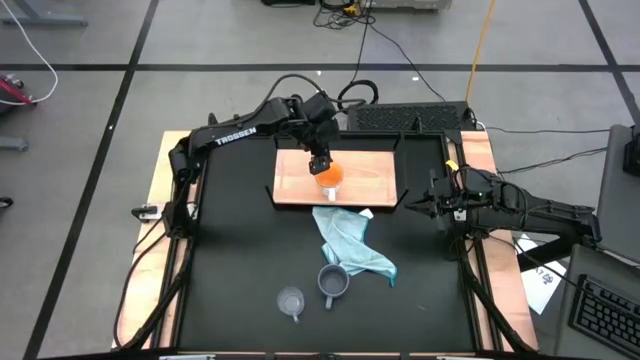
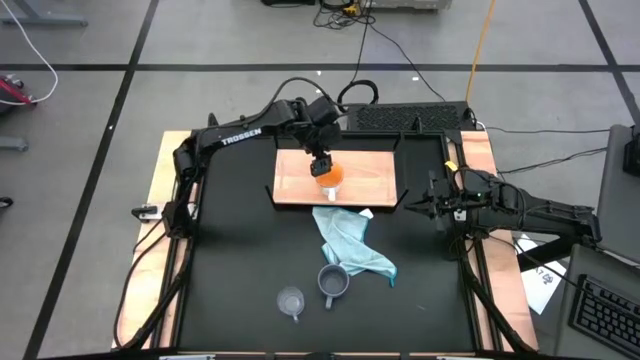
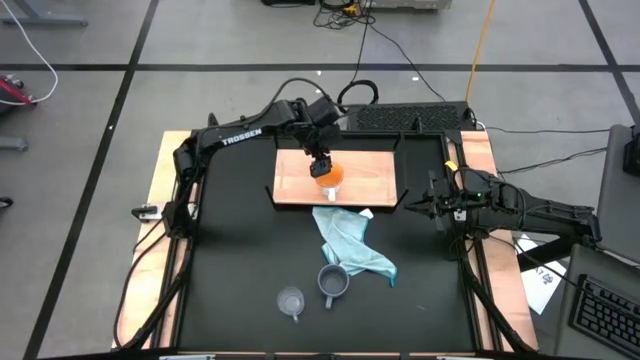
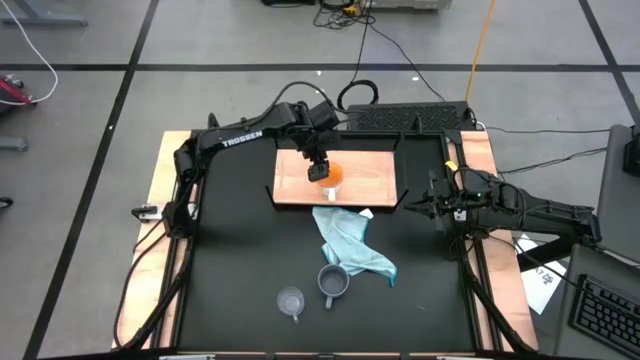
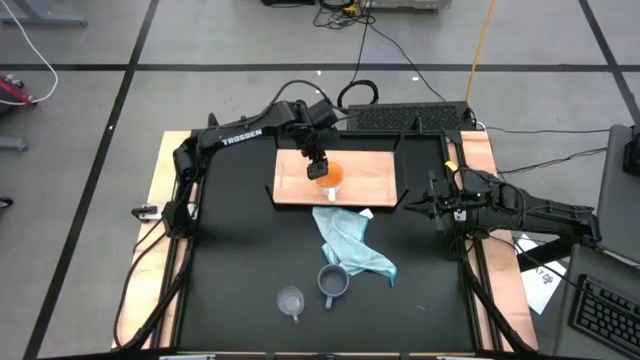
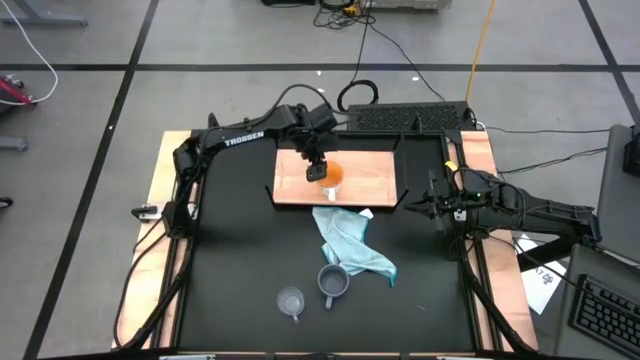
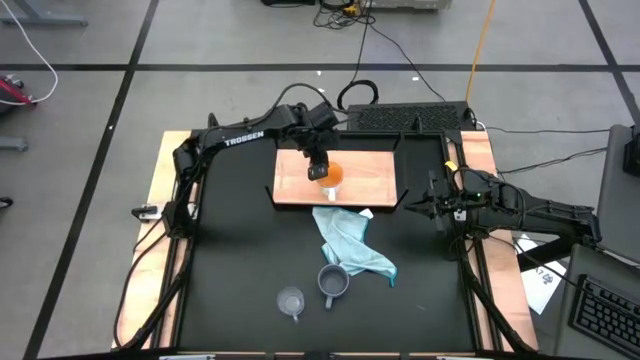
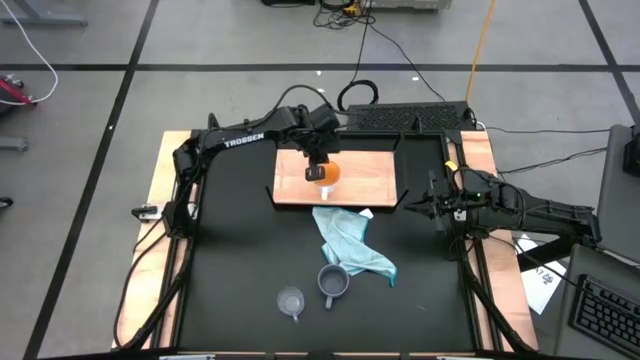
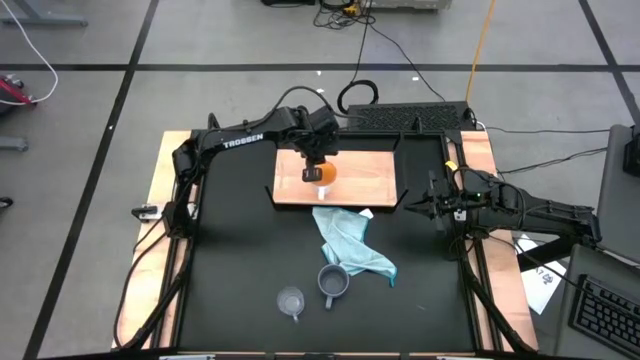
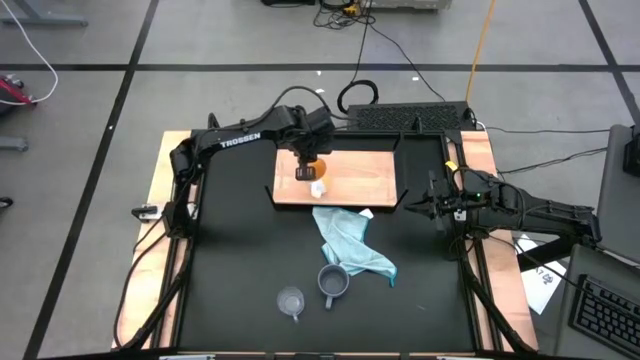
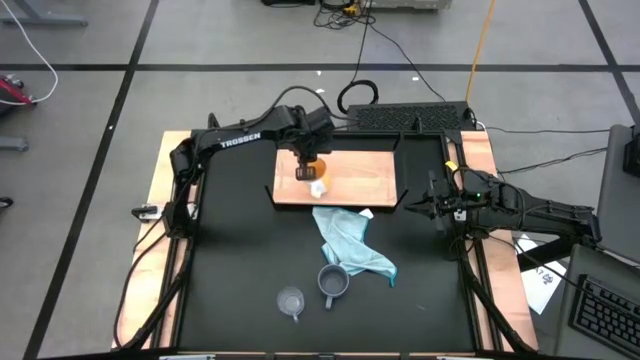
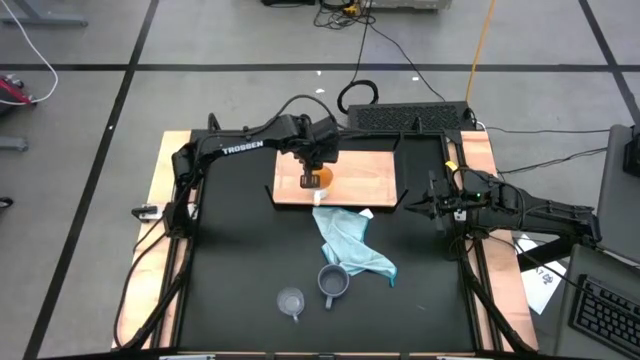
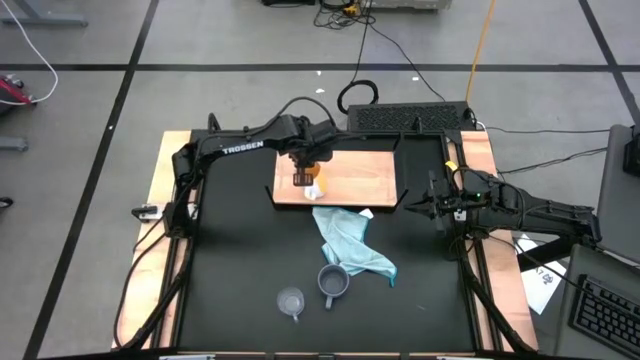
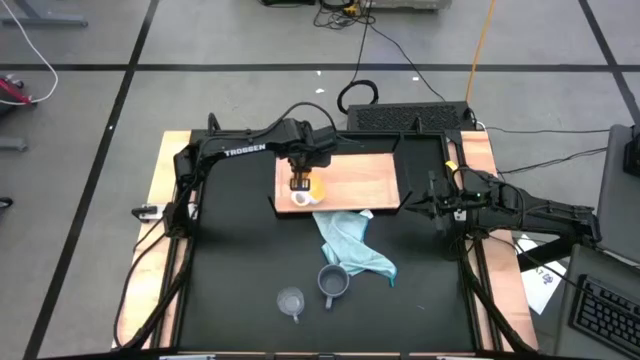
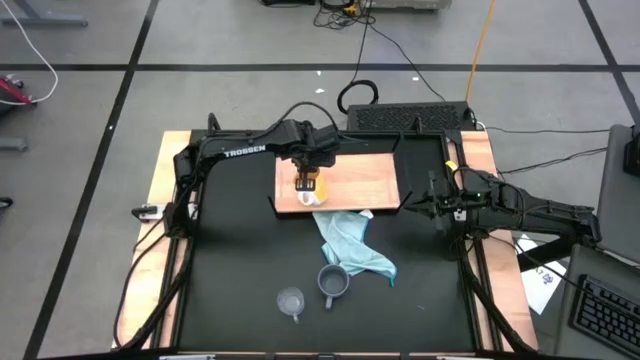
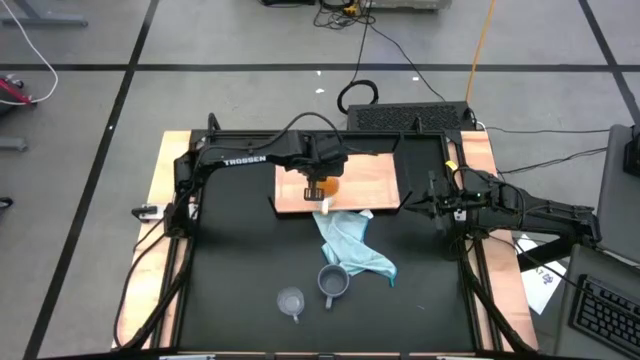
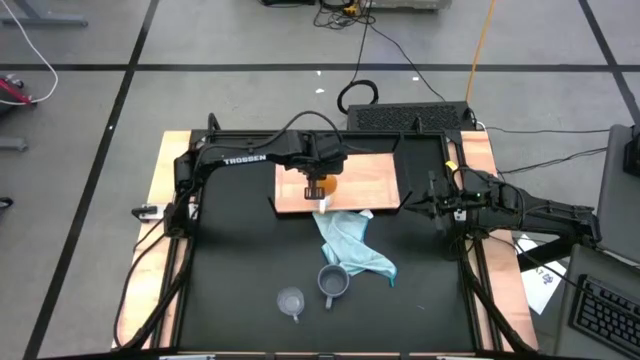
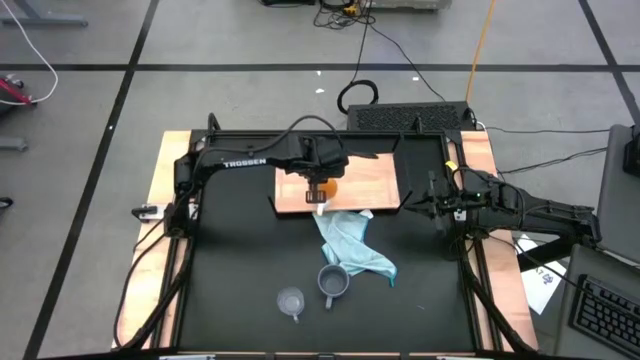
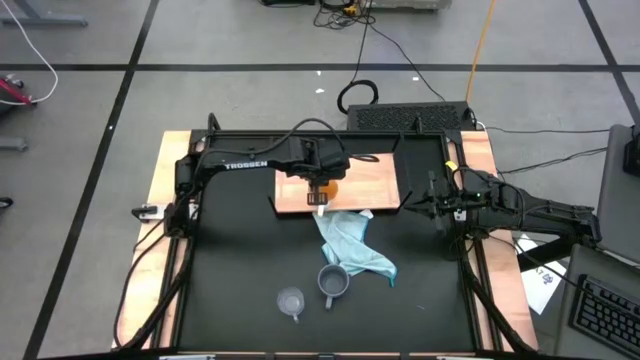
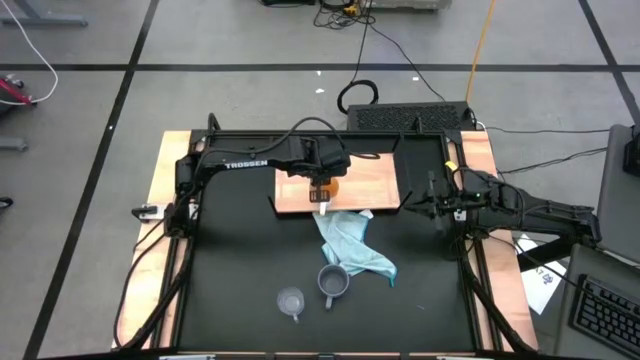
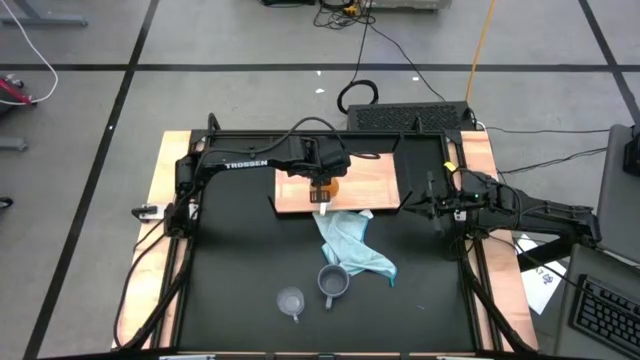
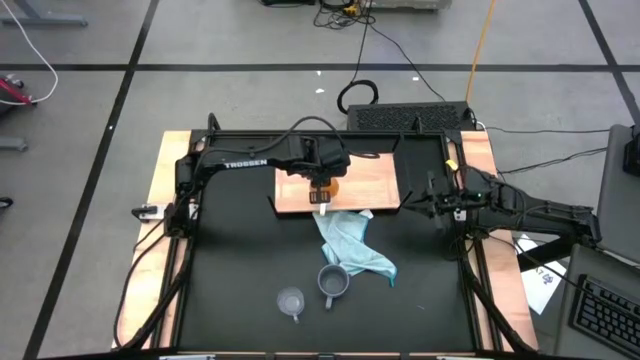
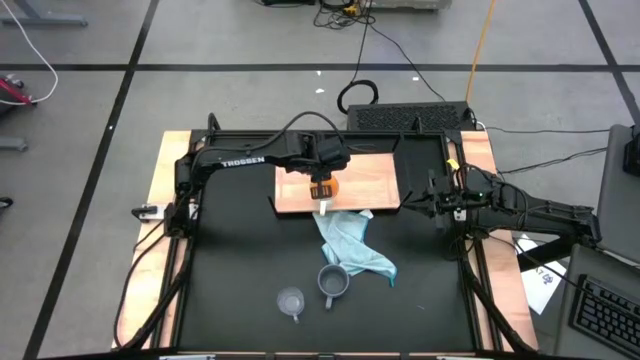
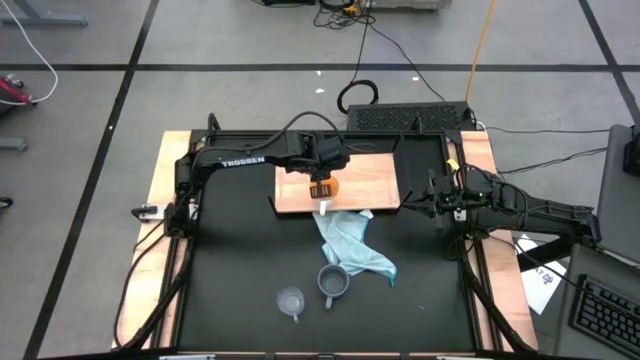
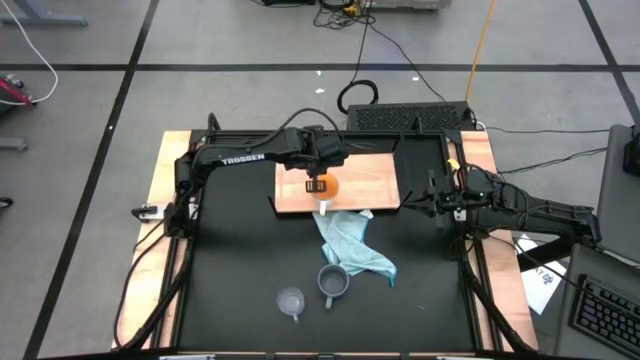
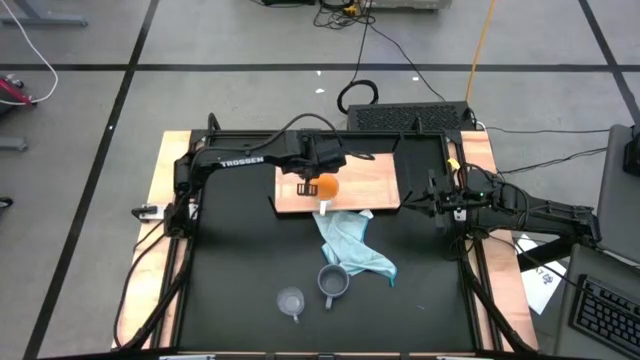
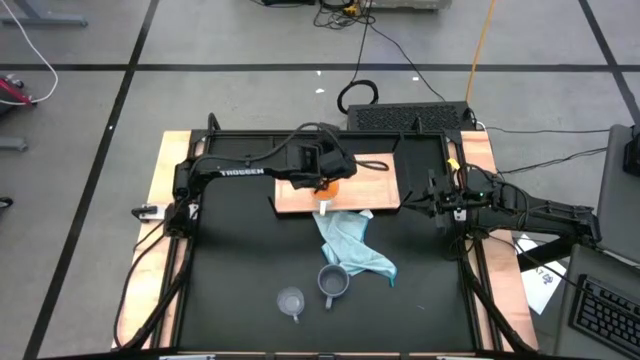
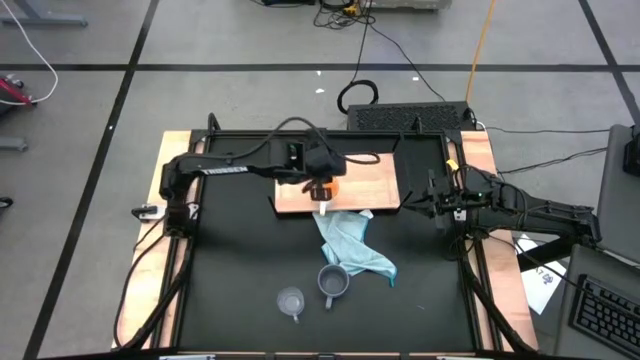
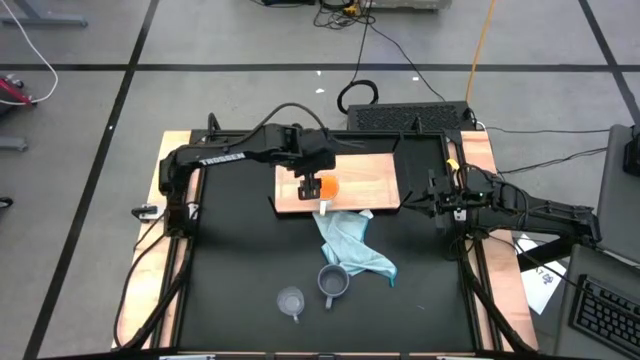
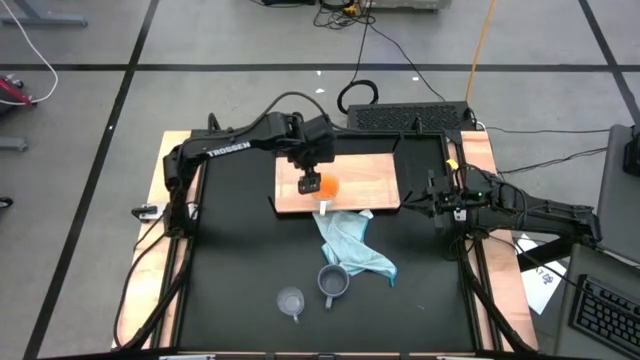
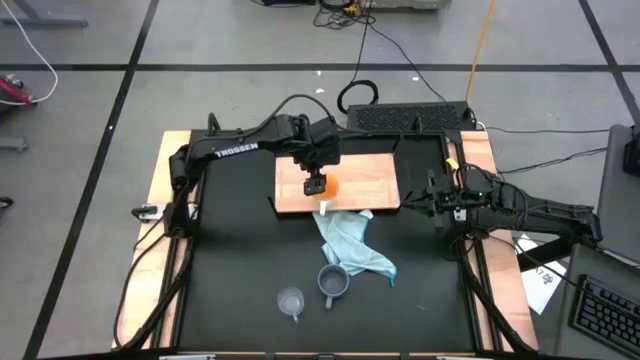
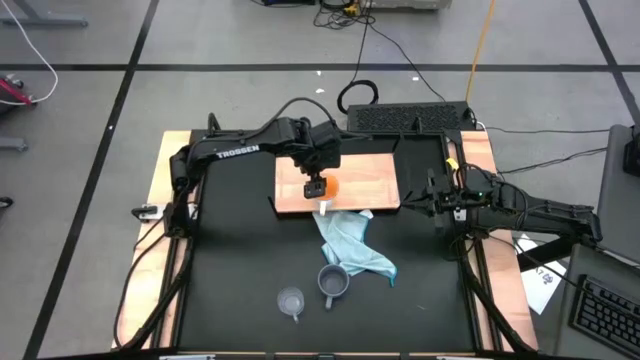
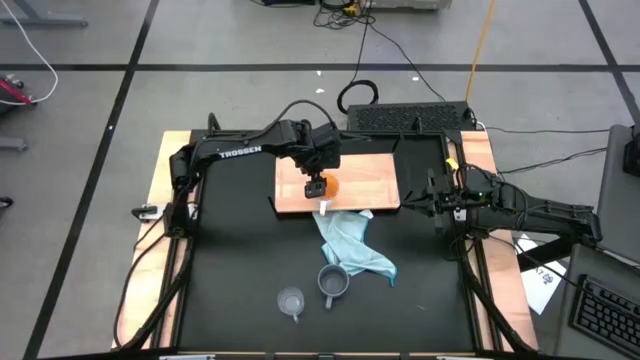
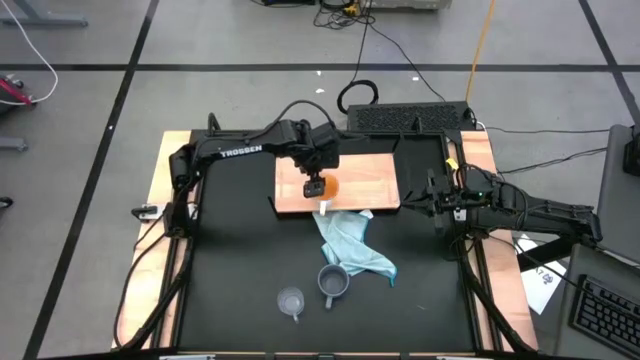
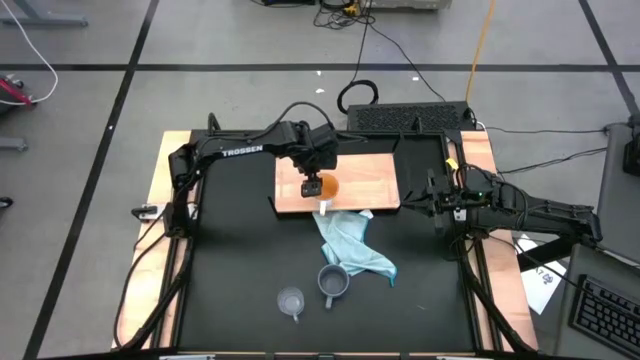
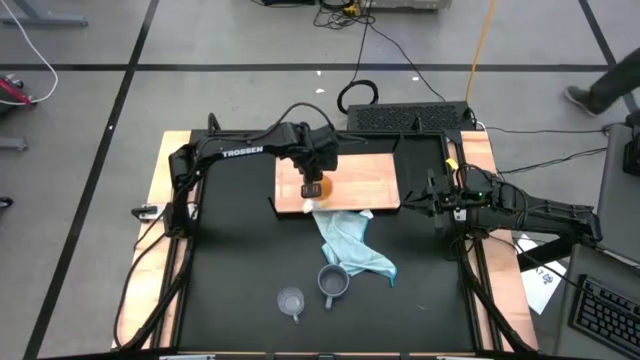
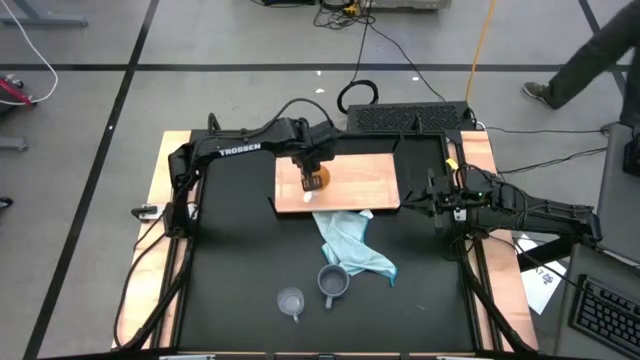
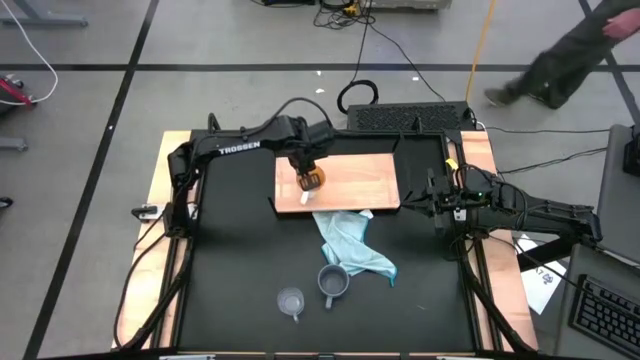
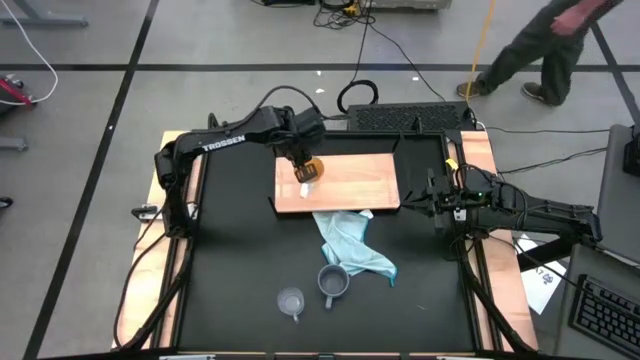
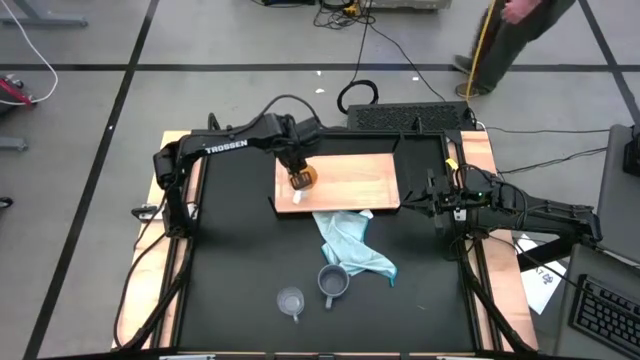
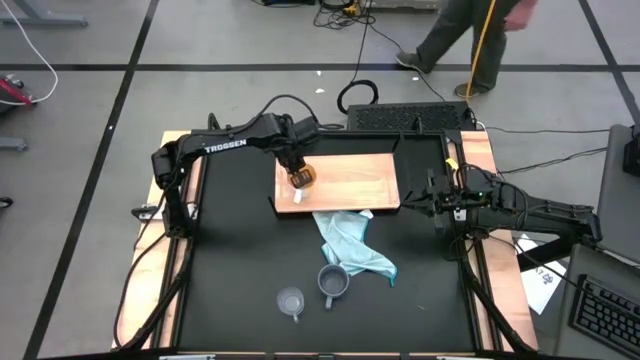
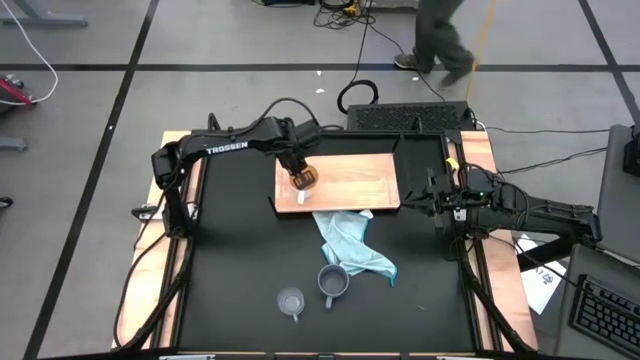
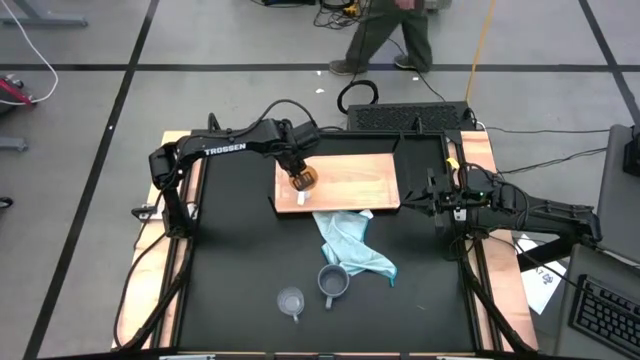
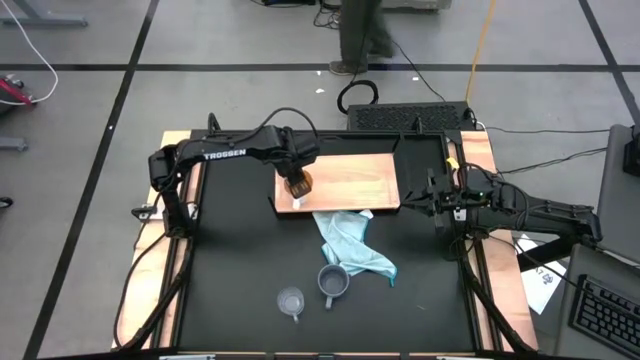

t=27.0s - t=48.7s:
Task: Stack small to large cups/mugs on shelf
Put the yellow mug on the shelf
